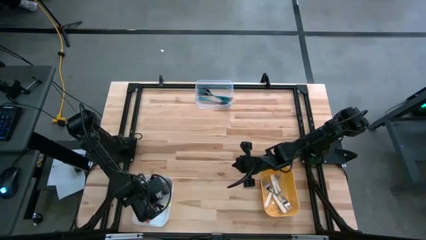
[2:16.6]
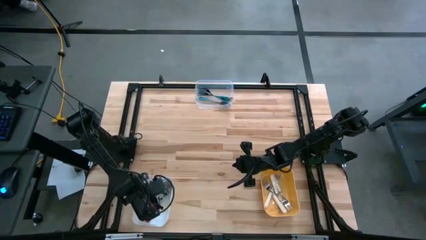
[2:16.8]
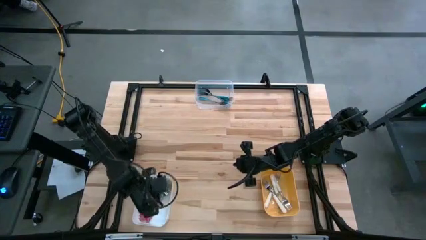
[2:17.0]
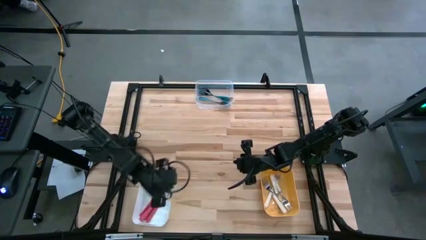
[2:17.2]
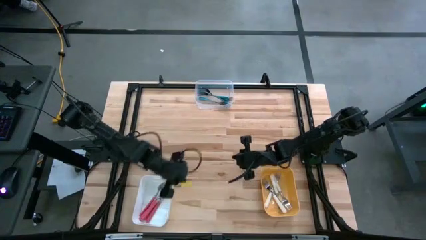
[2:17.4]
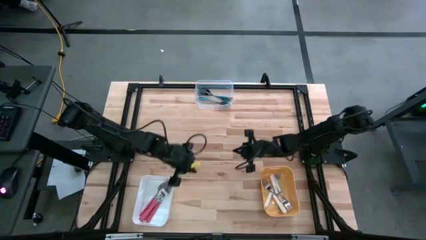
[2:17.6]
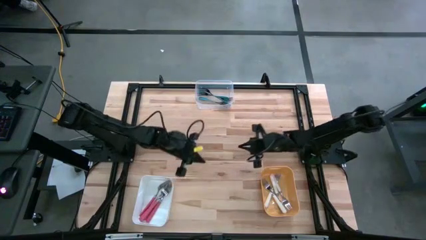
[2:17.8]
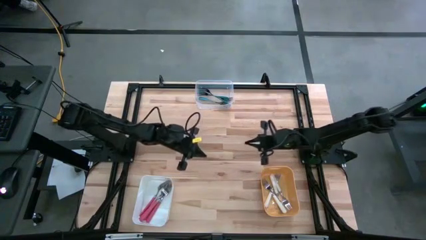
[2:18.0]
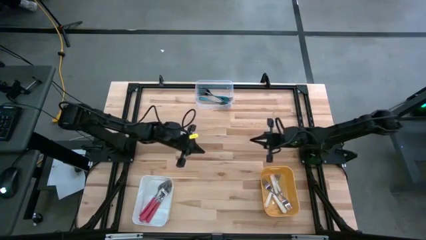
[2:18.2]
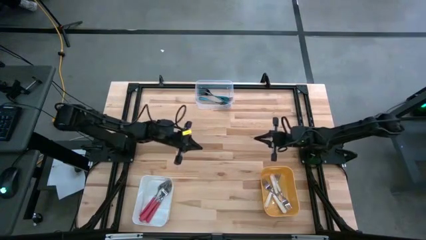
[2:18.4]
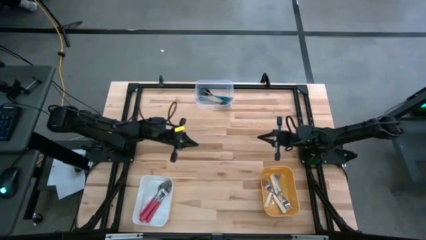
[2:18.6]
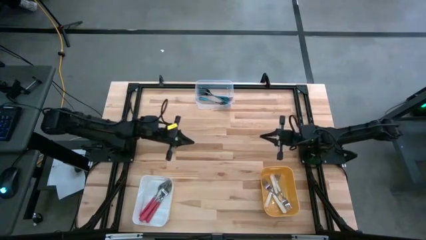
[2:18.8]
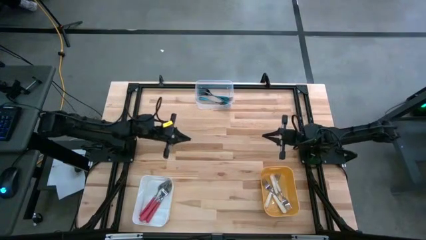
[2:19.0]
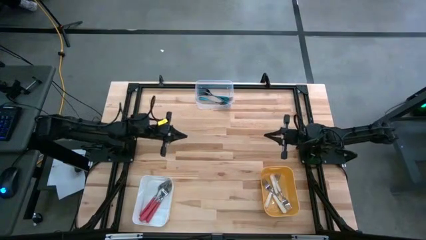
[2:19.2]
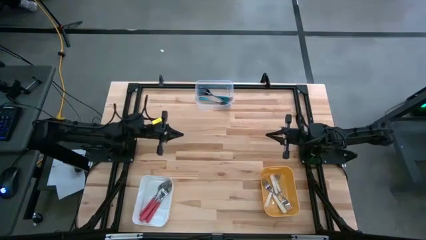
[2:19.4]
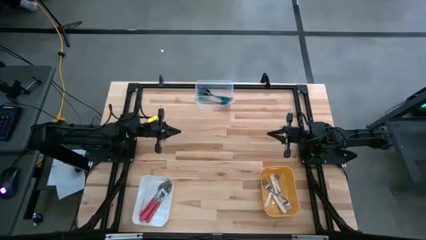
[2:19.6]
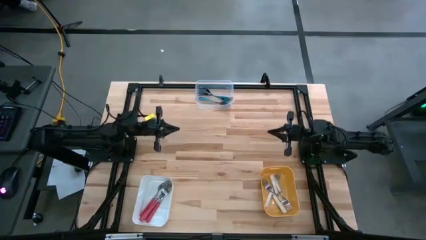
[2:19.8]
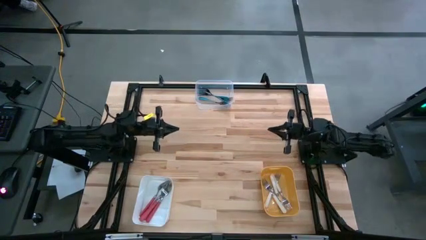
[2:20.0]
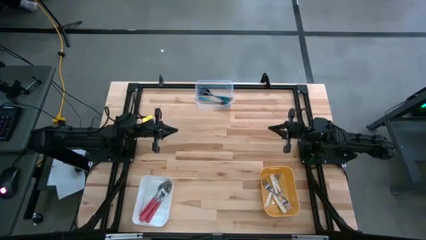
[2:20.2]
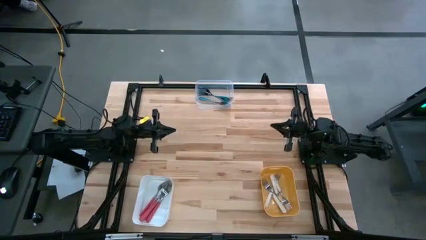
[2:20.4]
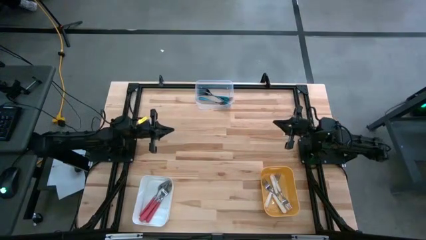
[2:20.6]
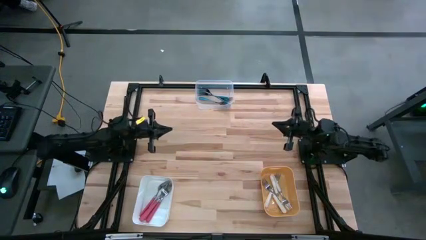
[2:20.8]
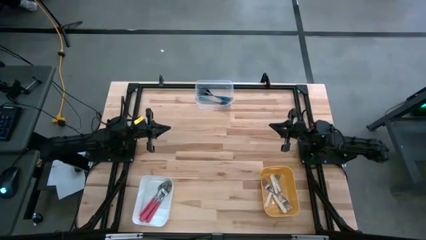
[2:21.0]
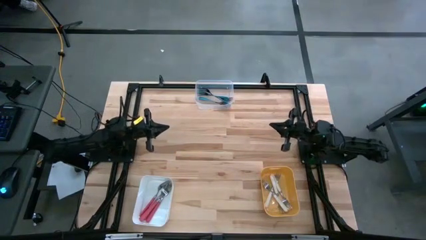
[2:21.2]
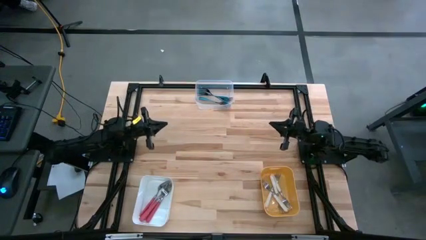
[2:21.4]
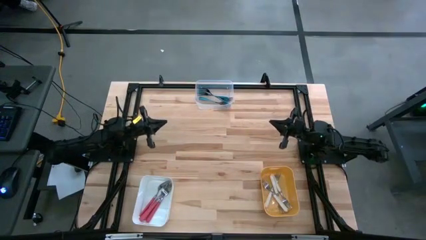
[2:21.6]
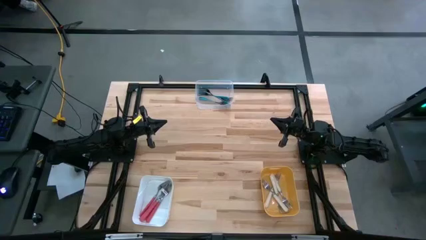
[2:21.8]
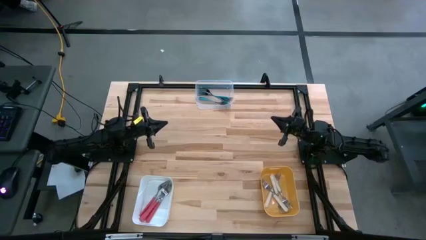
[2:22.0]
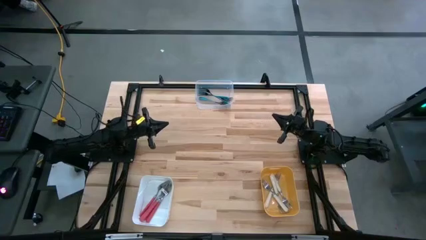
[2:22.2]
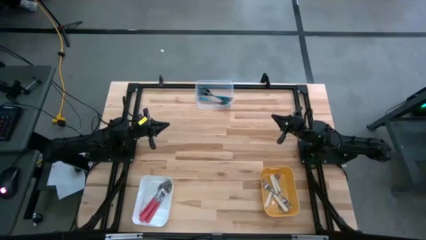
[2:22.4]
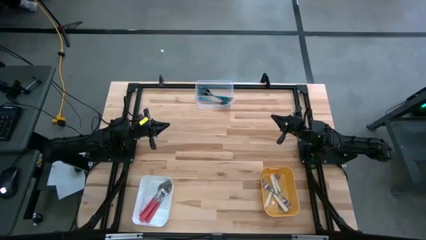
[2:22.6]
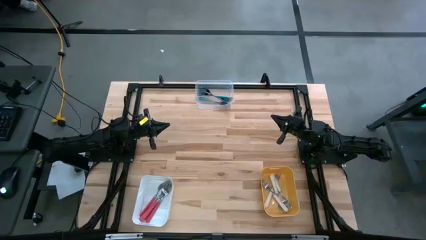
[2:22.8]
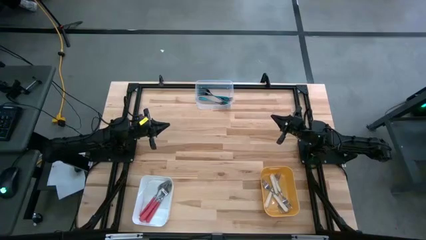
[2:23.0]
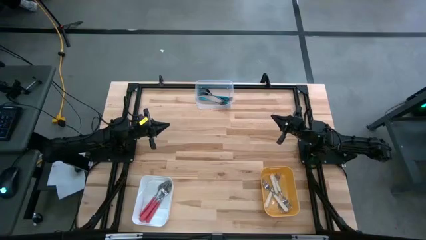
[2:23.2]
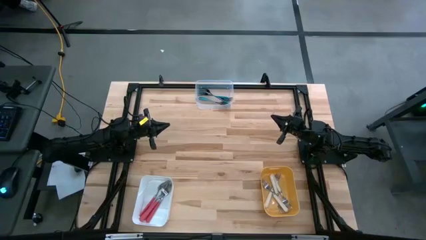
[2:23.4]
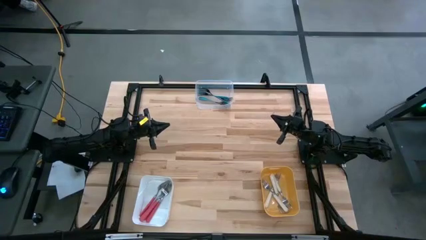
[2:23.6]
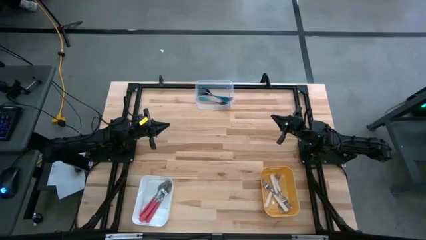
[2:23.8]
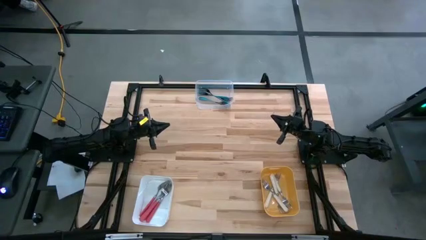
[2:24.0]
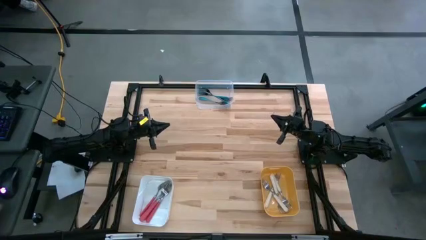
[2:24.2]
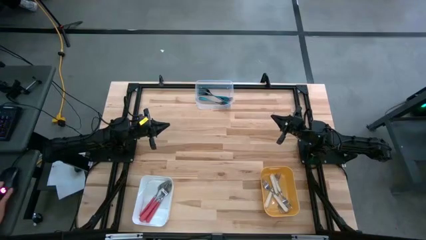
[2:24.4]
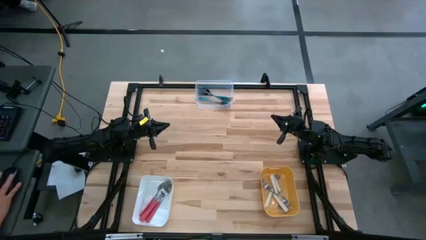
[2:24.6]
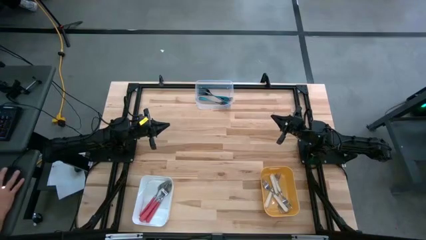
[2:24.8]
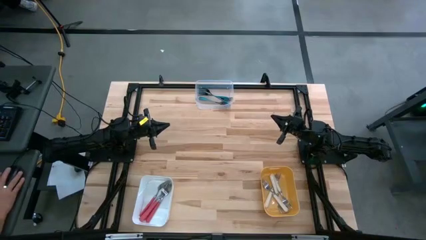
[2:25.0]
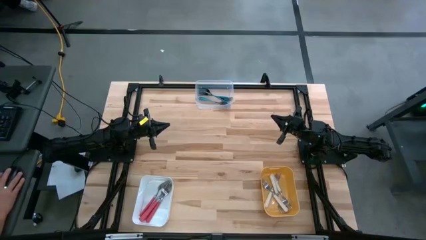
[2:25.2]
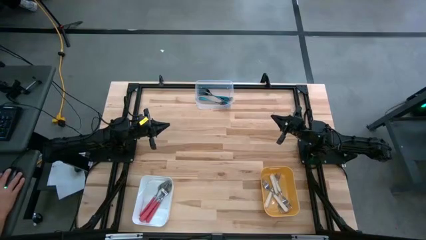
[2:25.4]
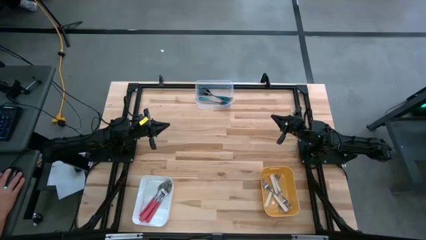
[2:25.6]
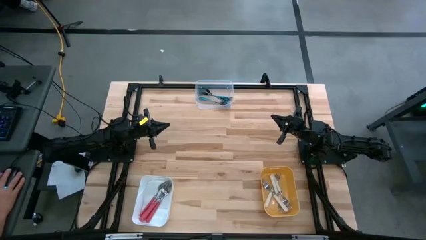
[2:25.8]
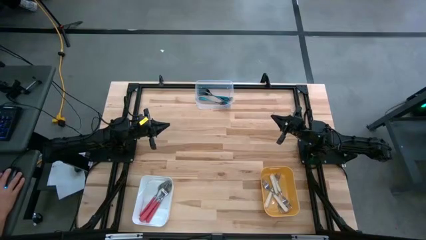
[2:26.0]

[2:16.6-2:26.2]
Task: Sort silverware by color (type)
Return to Home Position

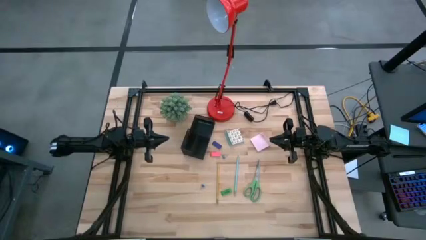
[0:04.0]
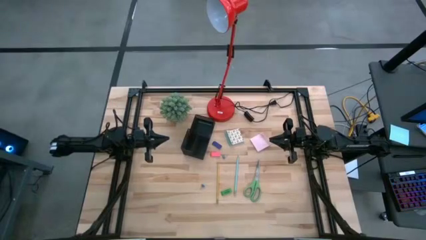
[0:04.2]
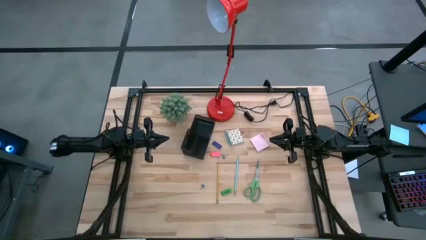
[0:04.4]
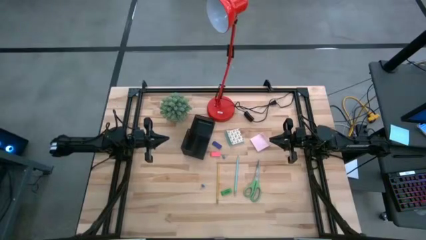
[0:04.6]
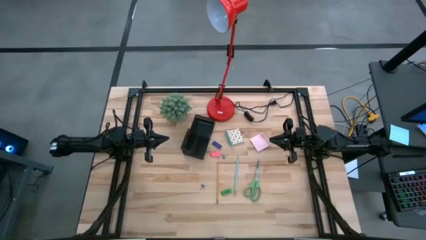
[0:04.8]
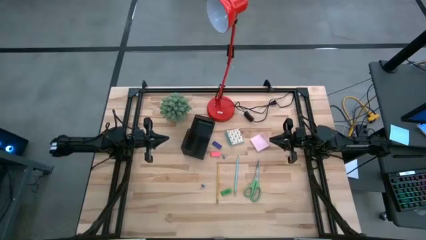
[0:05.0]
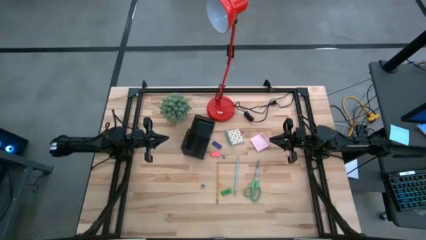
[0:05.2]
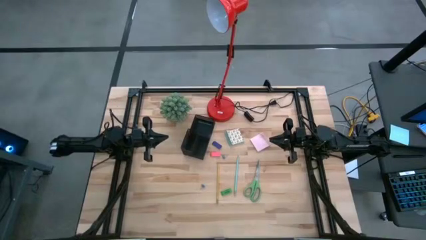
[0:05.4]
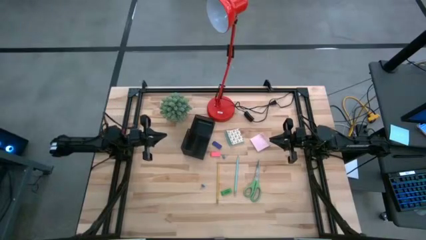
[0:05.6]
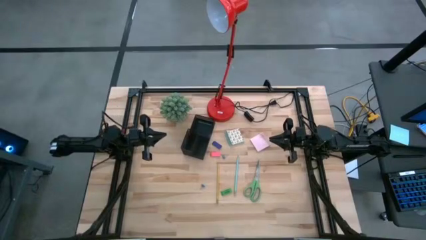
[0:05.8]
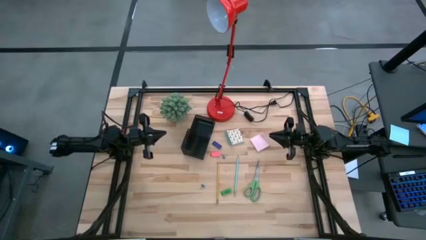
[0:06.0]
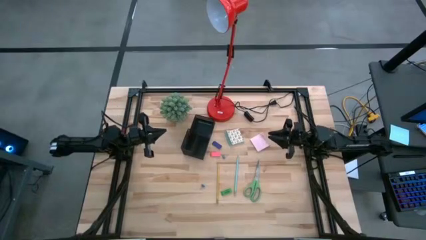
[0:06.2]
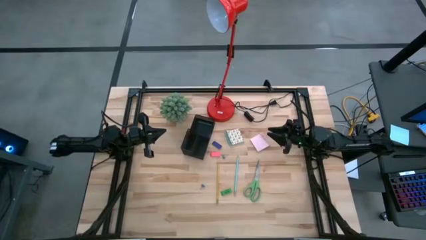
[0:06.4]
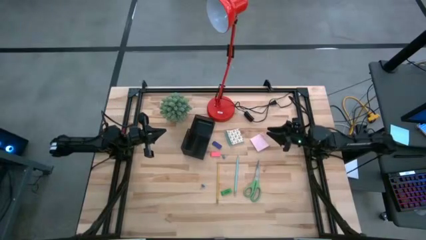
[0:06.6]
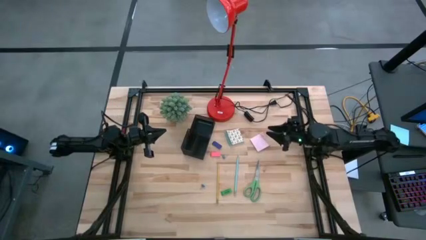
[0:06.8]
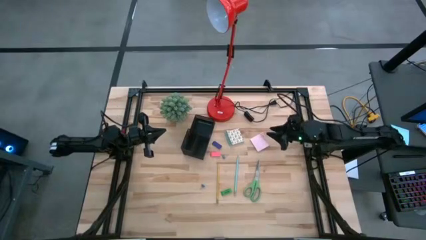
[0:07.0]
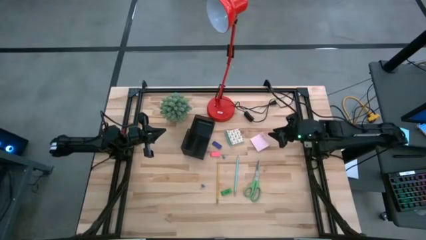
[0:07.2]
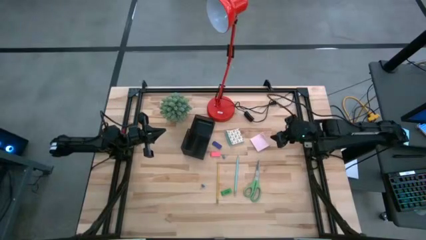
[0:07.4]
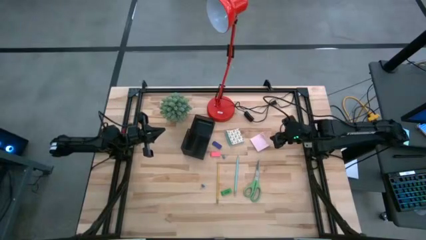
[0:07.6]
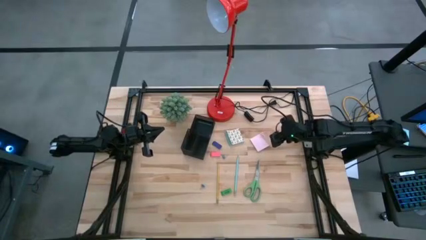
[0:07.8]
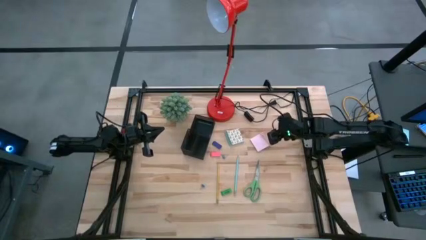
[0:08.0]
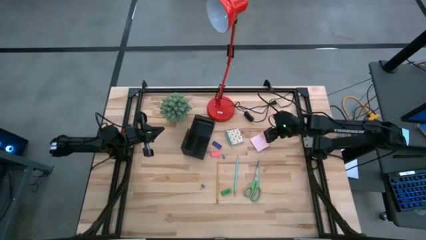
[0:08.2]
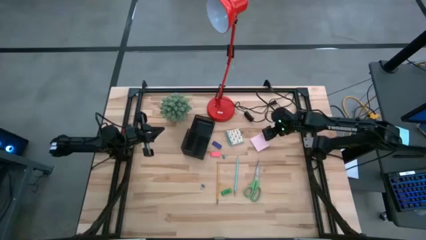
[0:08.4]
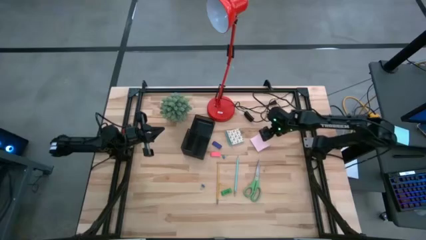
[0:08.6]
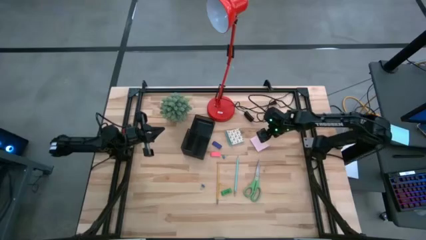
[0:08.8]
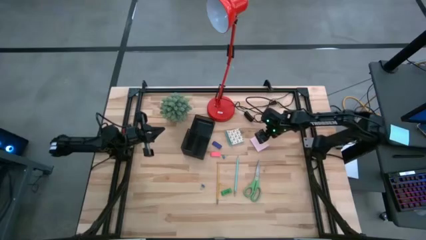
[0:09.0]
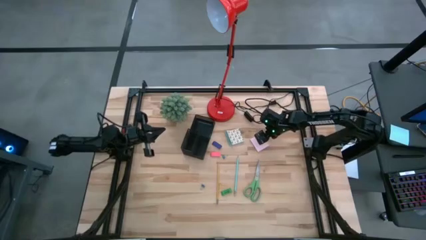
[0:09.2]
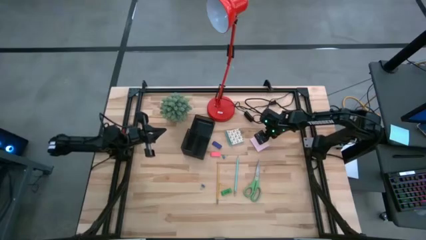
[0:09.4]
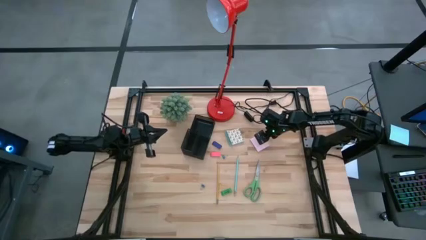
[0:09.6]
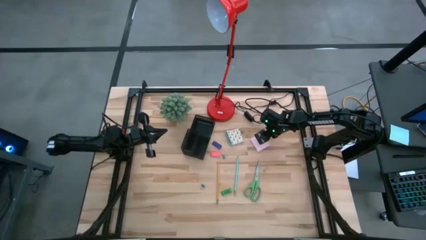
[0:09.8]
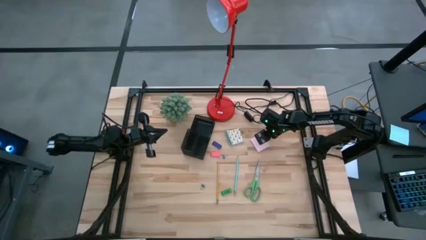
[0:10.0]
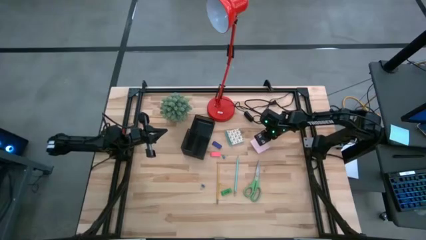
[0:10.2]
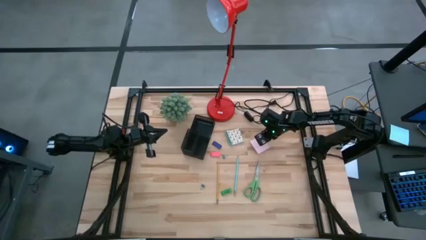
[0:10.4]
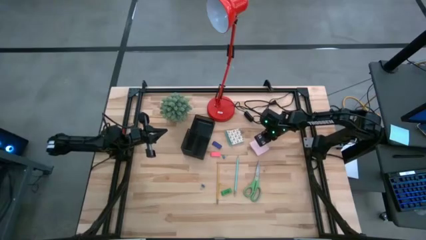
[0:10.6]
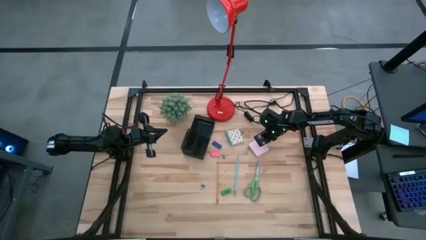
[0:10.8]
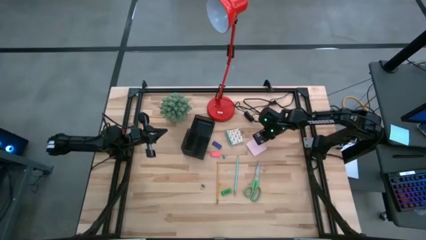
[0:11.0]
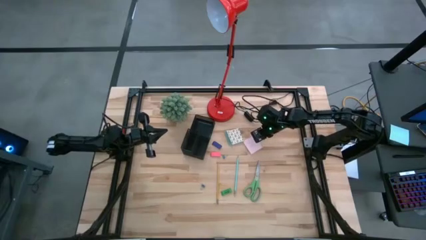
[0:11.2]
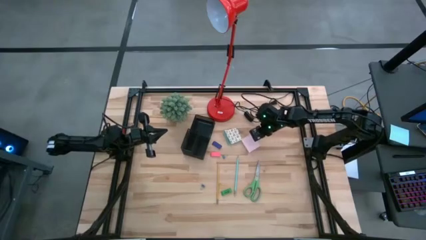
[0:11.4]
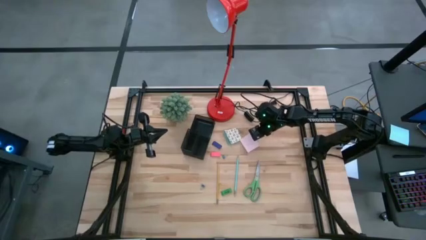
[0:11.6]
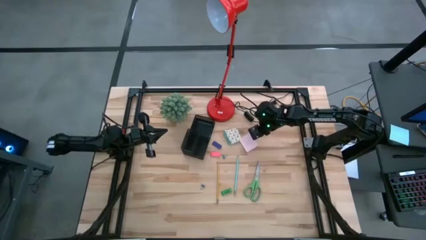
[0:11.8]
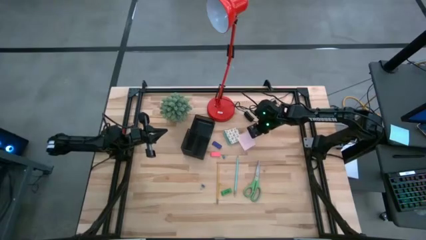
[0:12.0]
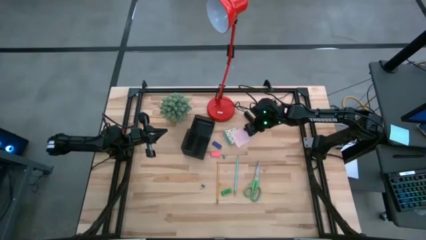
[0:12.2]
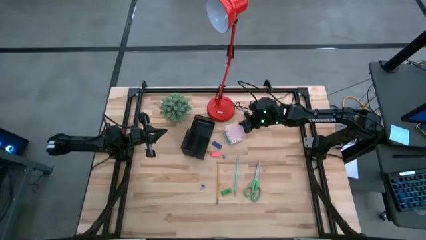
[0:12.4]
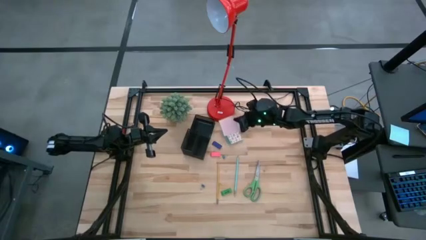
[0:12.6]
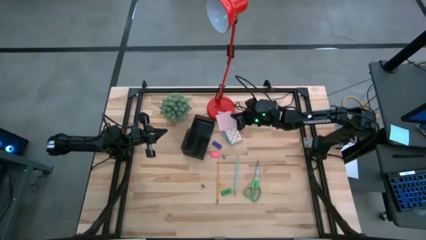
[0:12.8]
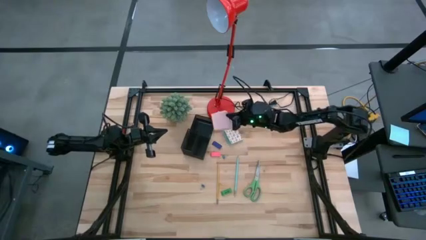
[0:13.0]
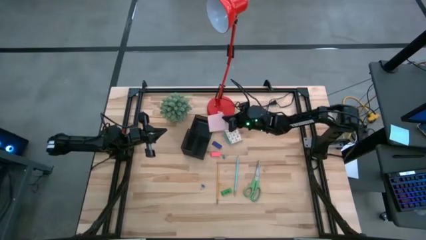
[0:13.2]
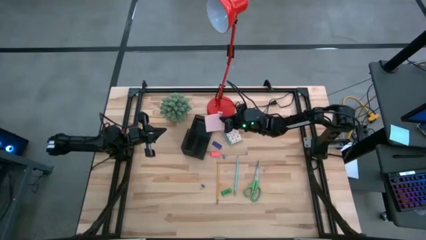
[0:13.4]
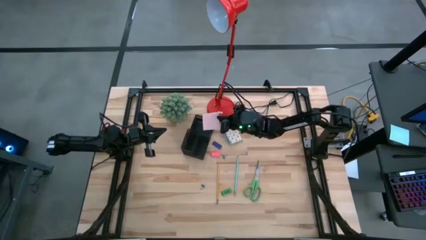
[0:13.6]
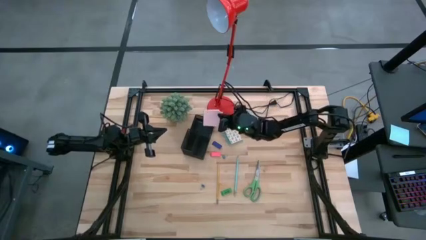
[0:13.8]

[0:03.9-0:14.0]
Task: Pick and place office supplies into organizer
Put the pink sticky notes in the black desk organizer
